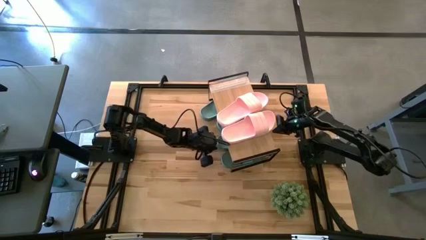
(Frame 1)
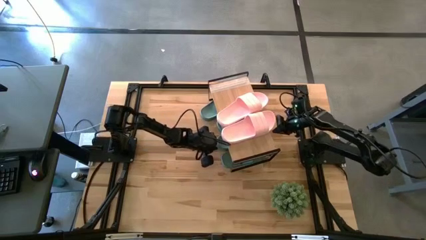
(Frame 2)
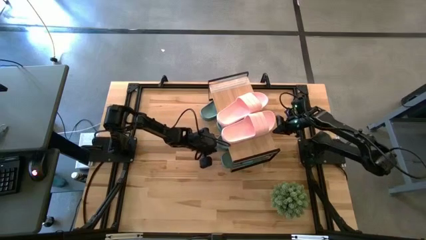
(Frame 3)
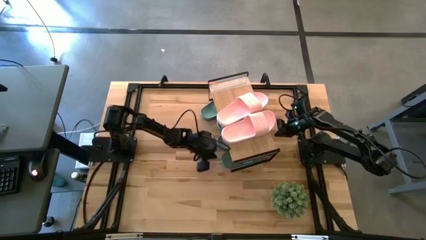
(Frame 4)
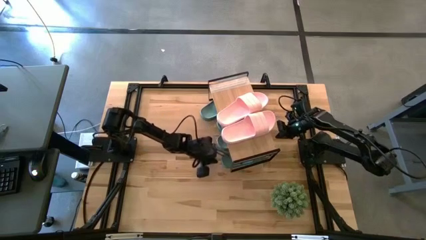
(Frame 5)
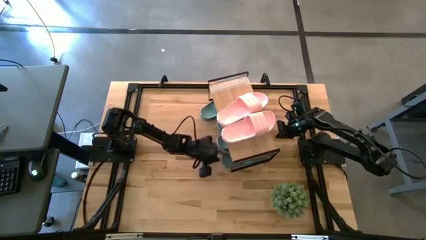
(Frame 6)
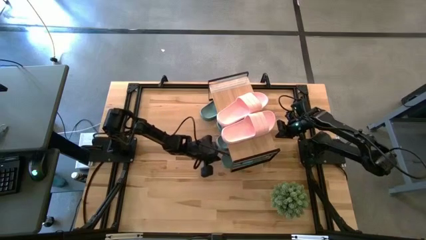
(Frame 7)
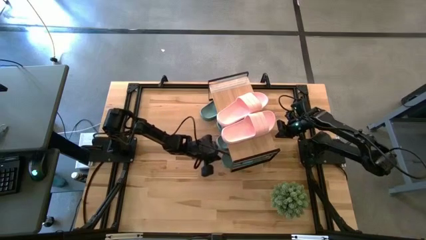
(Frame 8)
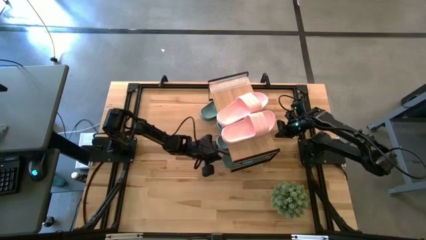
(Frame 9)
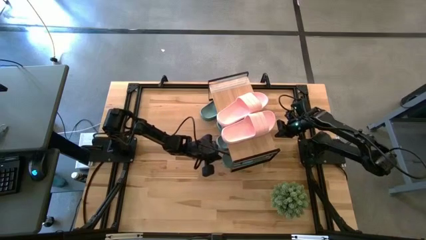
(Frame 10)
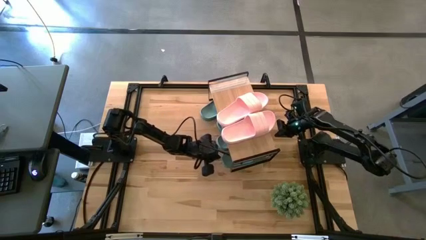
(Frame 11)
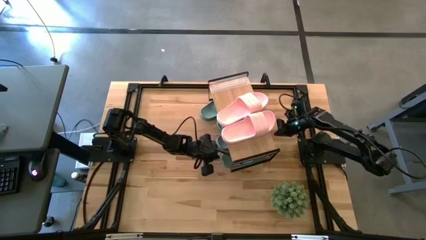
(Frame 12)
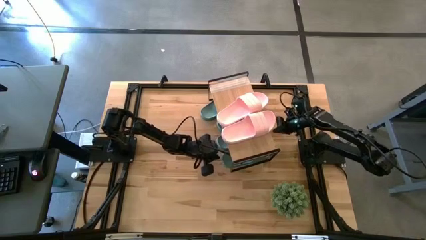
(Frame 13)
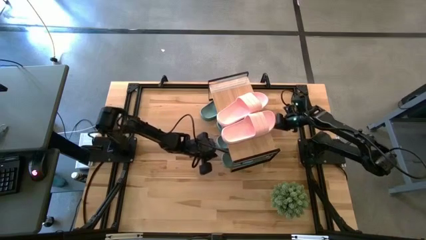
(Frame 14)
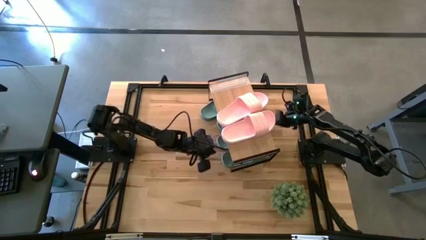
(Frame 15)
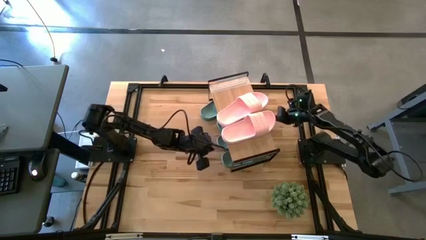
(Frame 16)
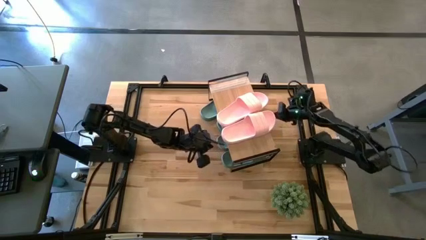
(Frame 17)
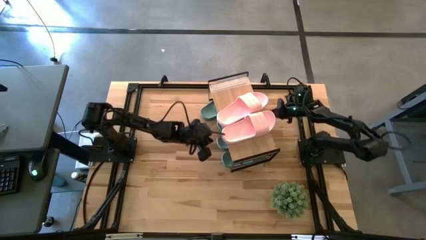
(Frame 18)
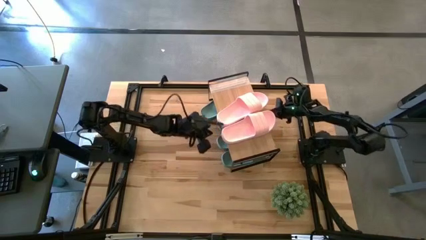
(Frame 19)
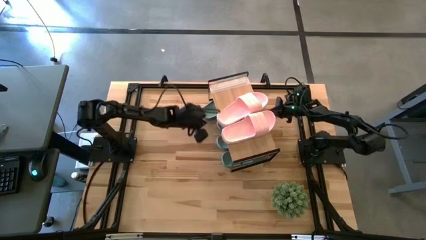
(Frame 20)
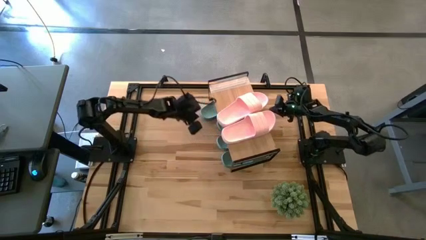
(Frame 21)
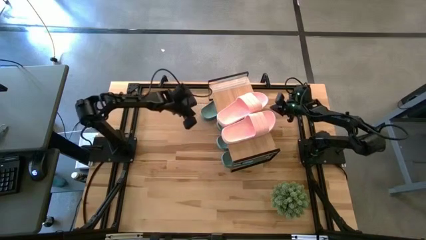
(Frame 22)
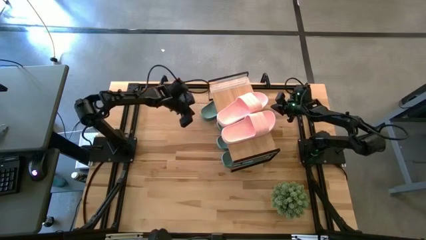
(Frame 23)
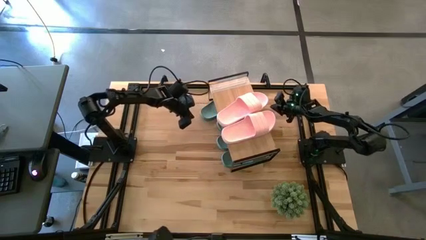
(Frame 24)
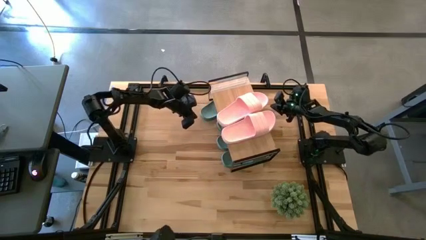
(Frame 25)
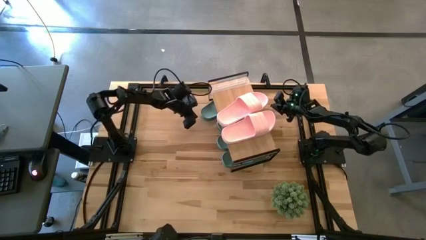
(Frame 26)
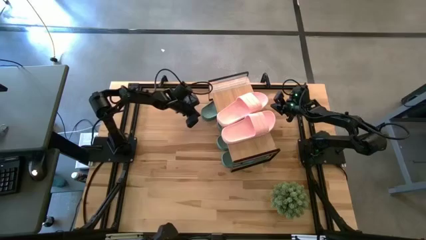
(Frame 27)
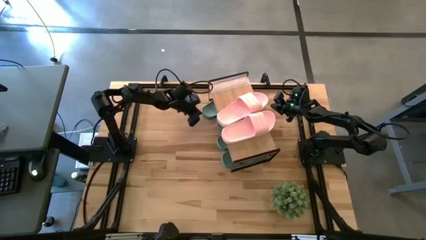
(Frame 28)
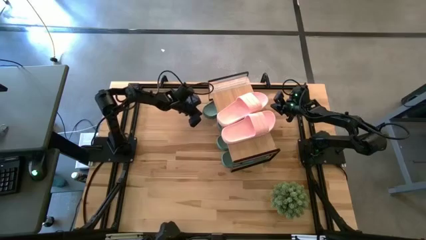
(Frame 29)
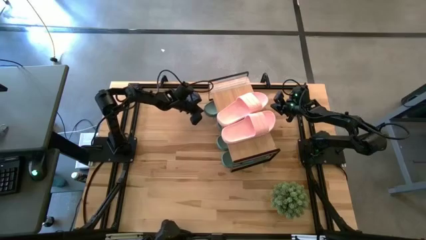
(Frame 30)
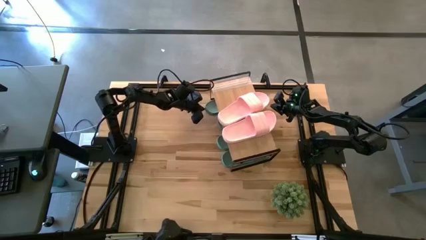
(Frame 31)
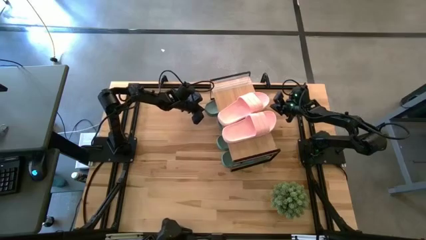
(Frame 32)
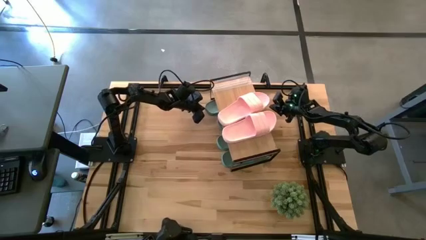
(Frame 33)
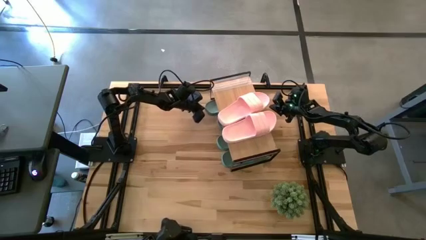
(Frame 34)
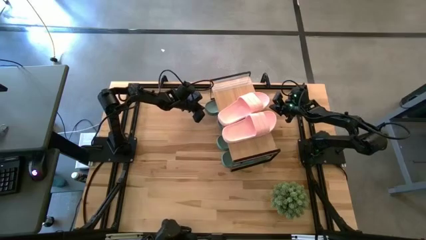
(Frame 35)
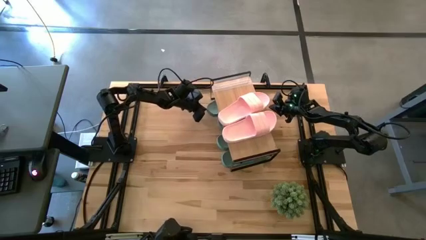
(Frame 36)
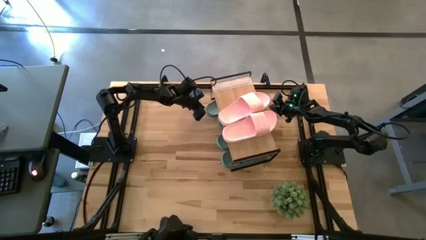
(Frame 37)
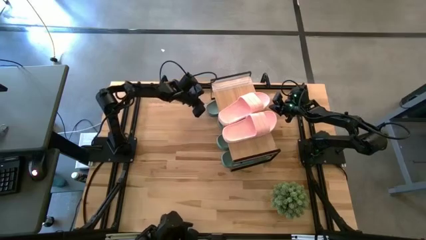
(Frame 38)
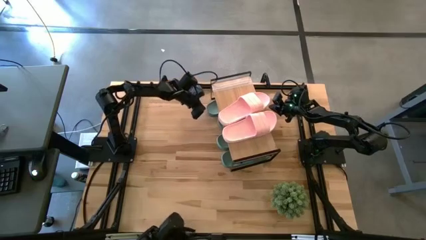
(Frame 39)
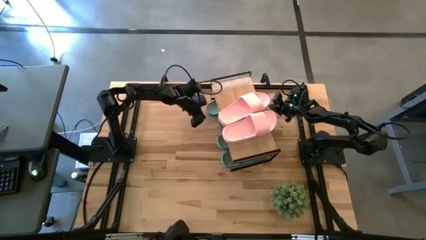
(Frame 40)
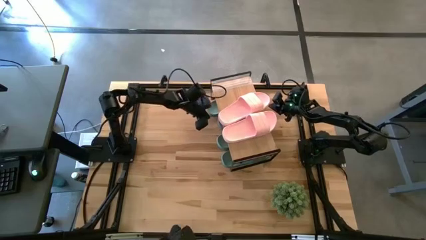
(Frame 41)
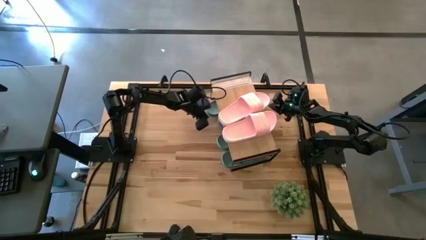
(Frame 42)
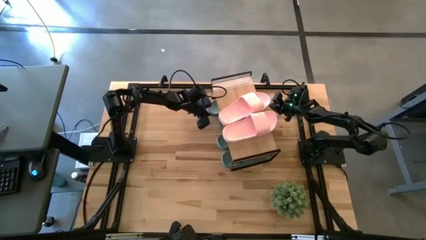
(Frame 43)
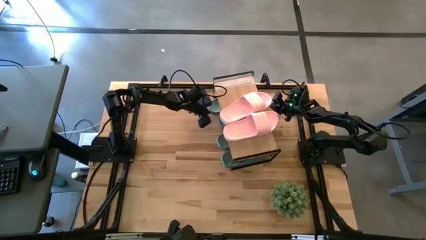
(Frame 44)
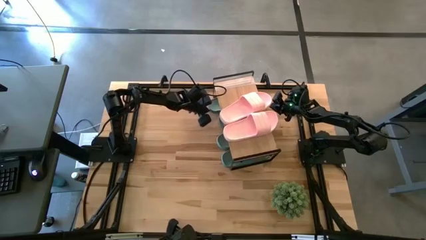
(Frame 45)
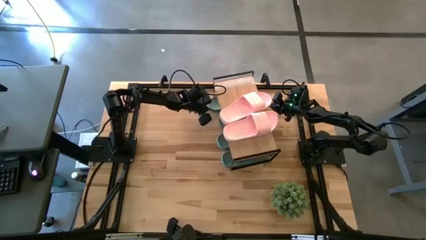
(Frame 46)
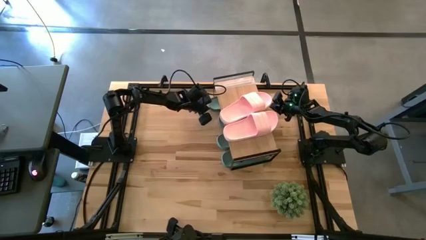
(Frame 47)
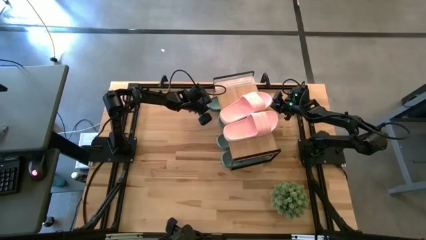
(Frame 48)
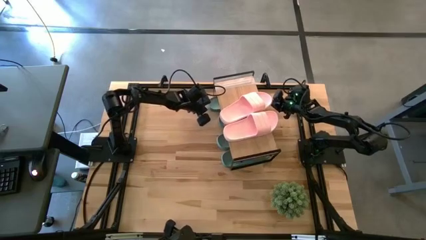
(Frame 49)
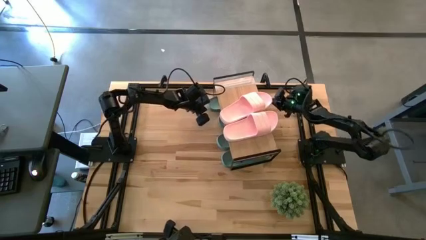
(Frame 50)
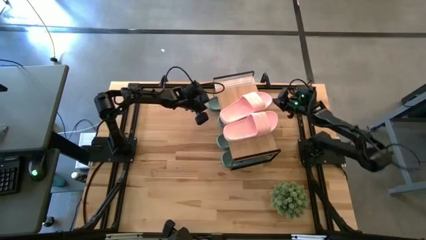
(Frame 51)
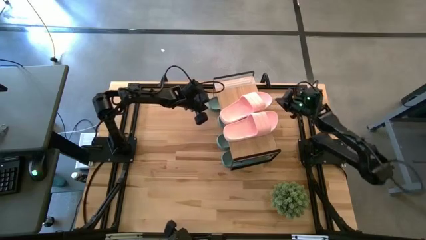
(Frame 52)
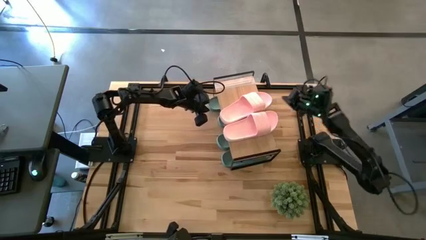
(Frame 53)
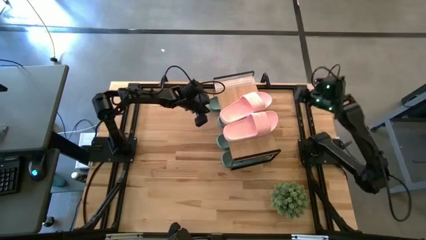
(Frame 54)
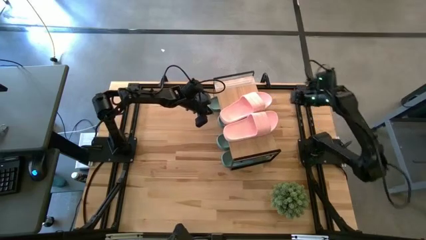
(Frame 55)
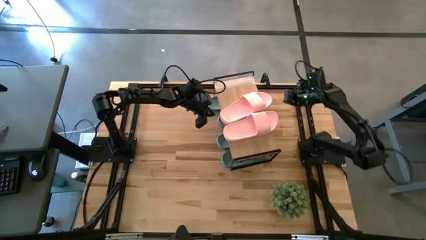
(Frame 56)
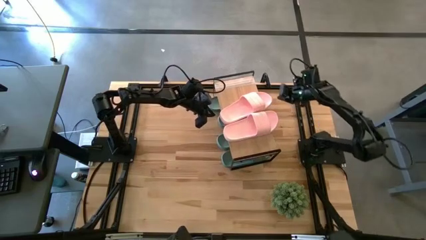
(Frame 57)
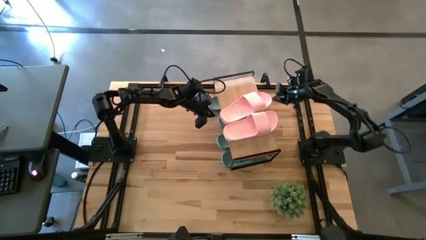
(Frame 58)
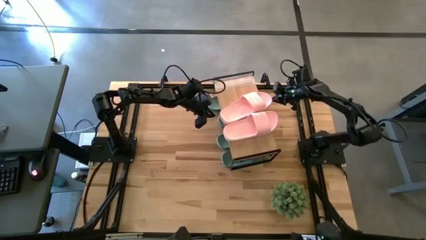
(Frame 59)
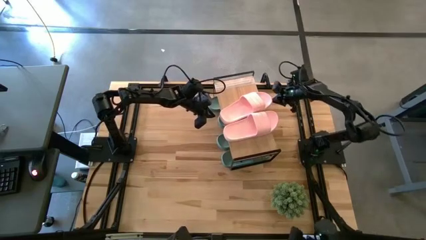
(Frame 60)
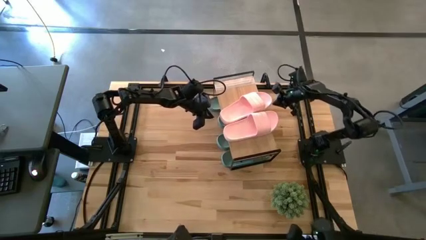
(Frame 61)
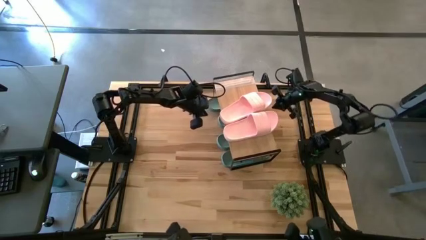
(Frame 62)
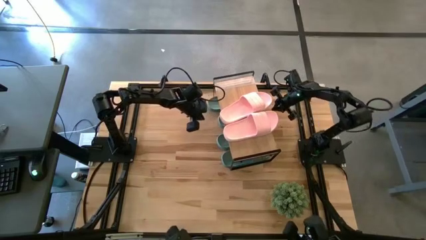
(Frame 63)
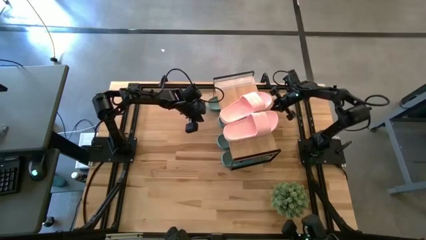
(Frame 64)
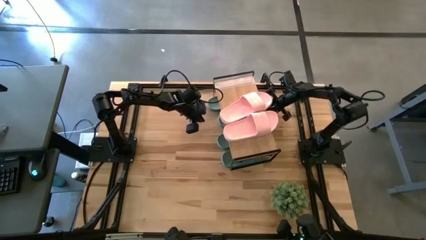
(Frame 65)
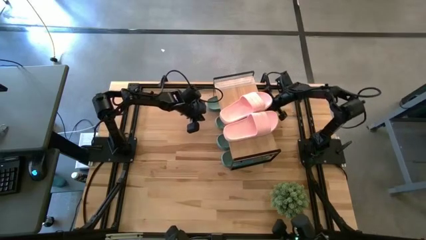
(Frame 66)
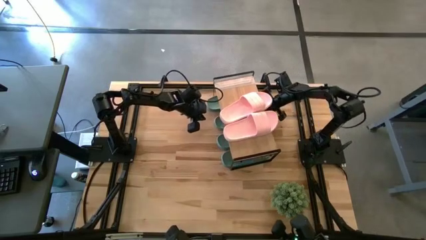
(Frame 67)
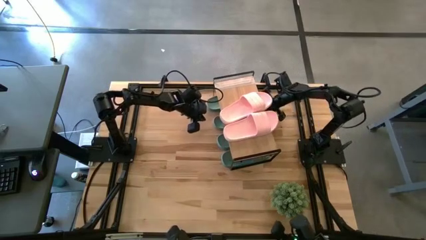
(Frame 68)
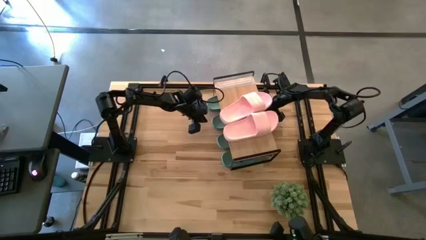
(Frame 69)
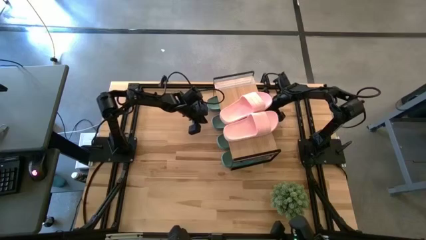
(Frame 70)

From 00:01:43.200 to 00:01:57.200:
Task: Pick and place slides into the shelf
Adjust the green slides

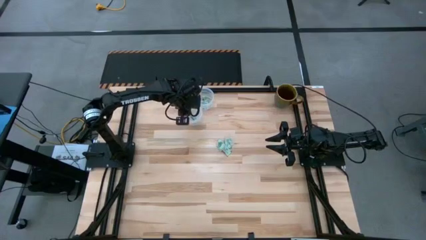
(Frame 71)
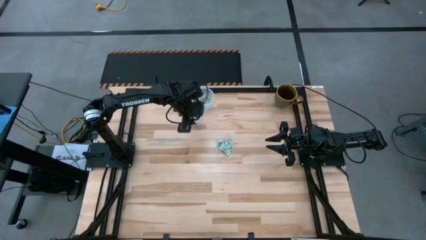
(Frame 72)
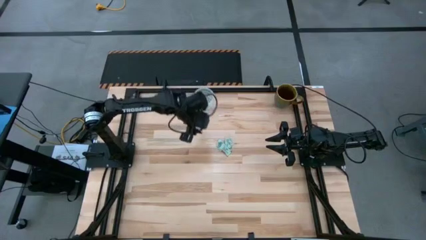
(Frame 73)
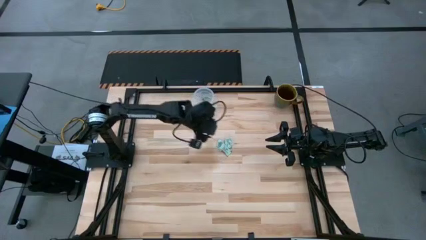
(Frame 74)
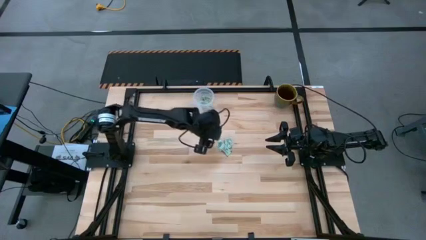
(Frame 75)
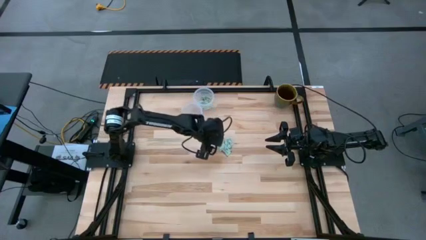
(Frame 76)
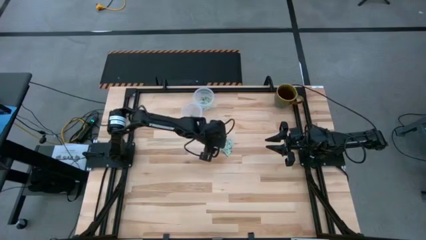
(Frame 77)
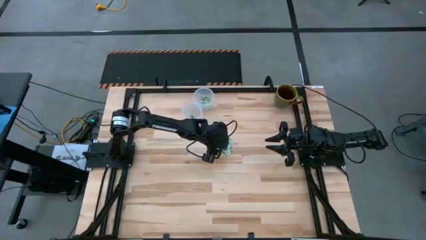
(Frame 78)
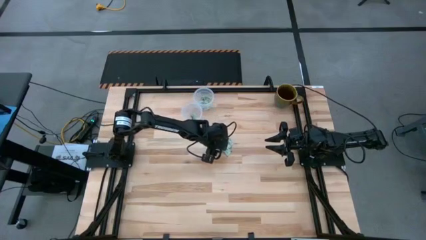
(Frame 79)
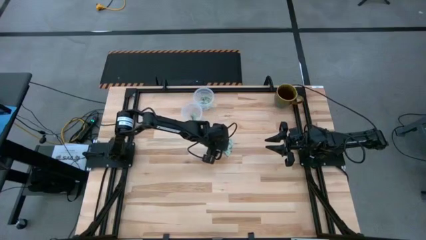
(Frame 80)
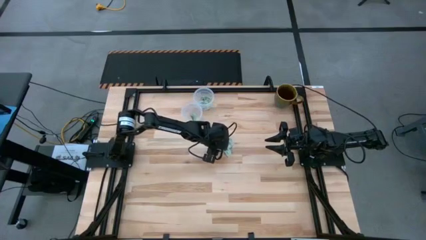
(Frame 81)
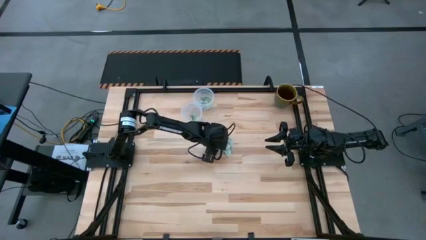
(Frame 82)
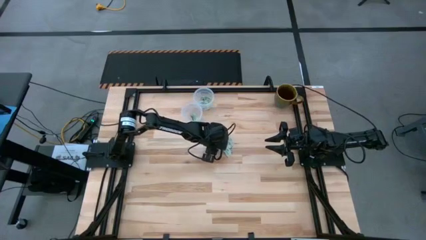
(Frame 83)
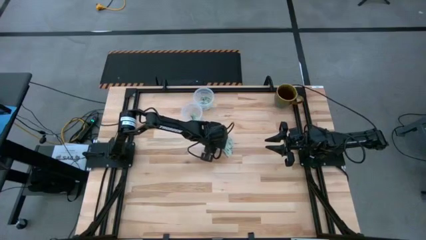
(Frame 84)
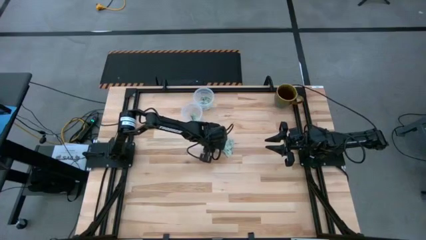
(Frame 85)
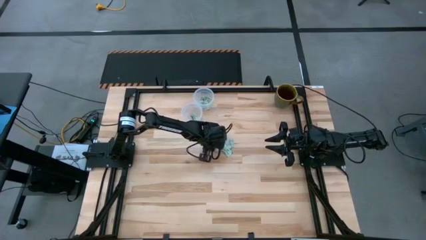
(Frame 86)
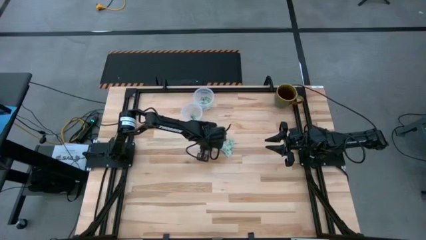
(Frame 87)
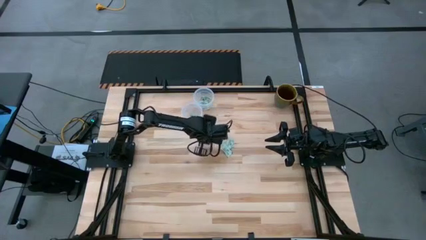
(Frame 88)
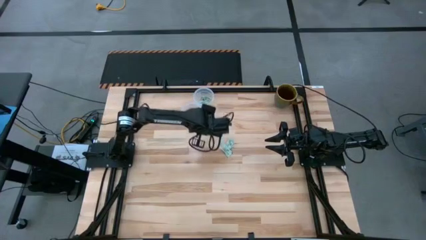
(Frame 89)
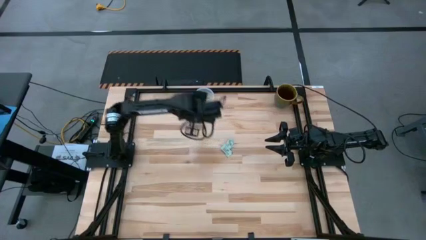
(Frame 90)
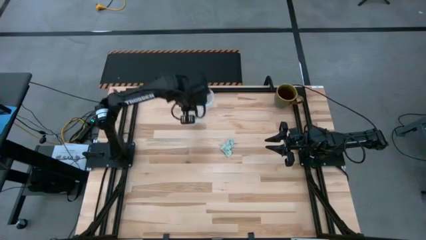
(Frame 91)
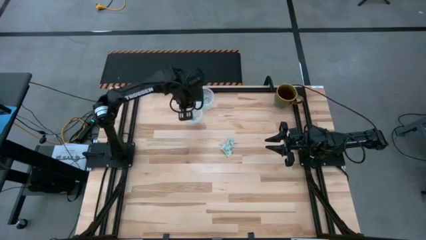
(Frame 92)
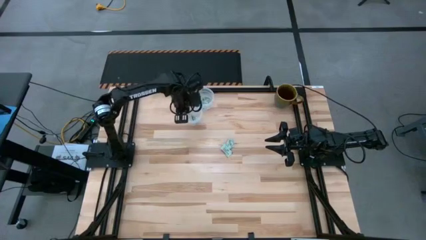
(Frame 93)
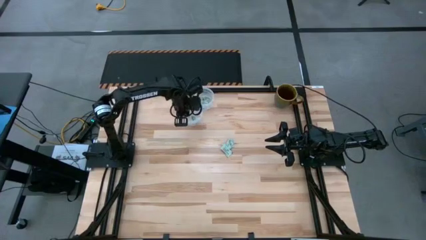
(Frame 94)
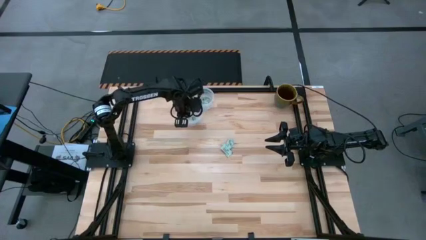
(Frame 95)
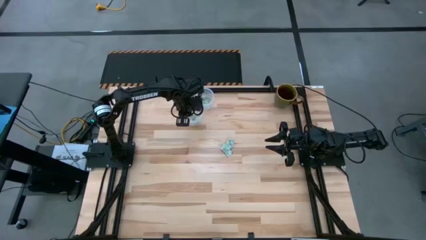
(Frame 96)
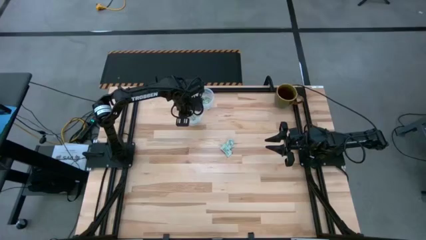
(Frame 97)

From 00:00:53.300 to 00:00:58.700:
Task: Pick and place items into bin
Put the stevia packet into the bottom bin
